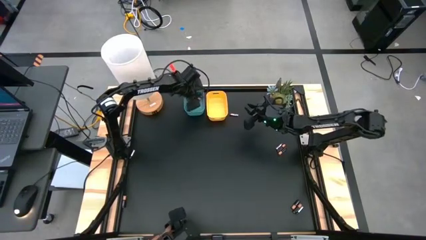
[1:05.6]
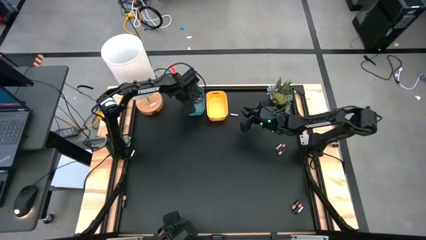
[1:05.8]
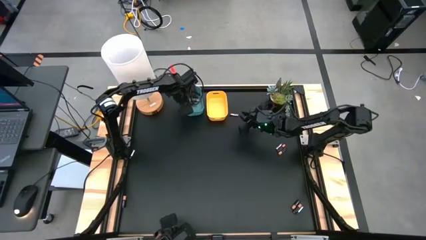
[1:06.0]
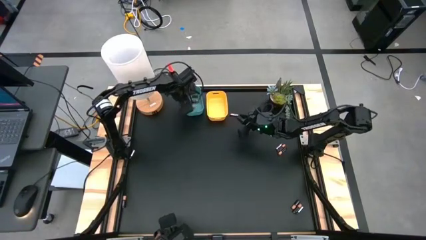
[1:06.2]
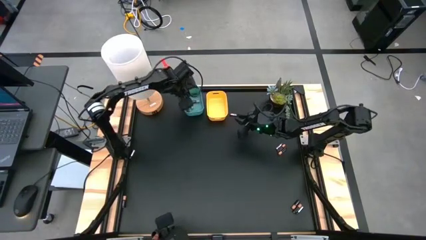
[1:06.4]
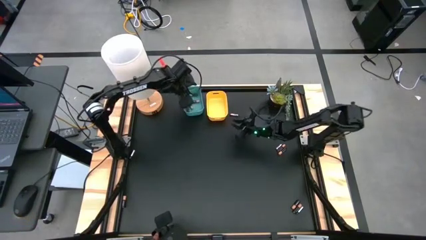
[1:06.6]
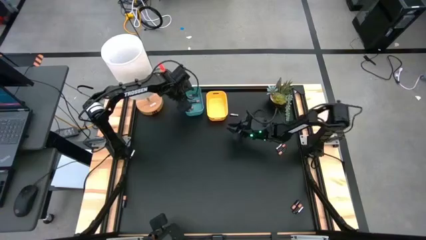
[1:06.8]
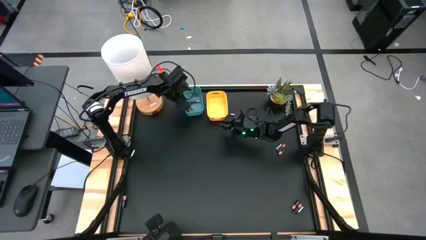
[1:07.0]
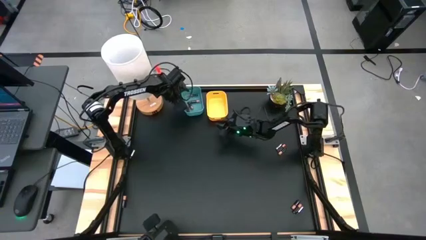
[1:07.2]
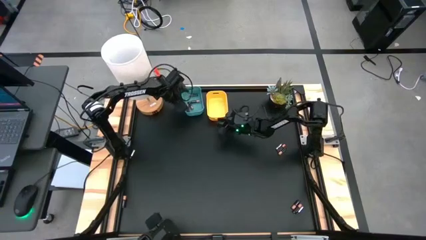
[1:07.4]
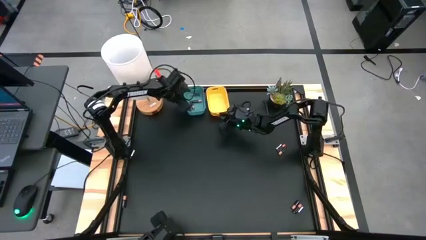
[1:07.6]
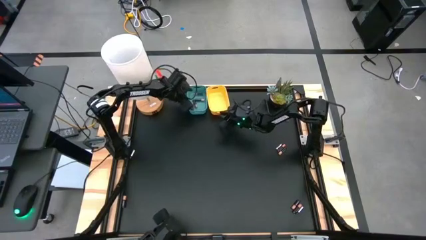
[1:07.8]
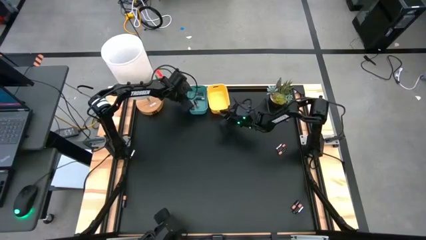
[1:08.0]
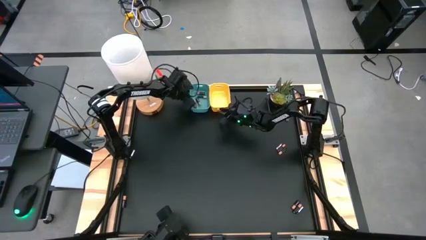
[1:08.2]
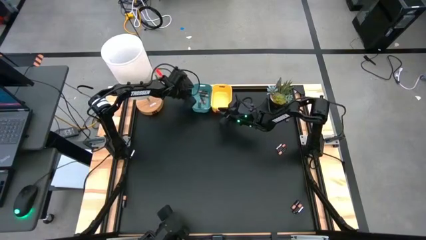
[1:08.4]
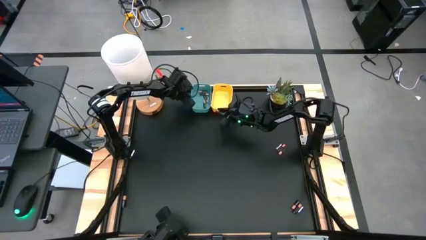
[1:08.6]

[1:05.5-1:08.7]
Task: Sort batteries
Adjust the bins

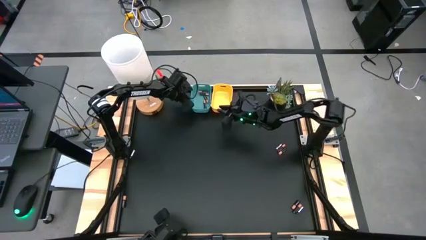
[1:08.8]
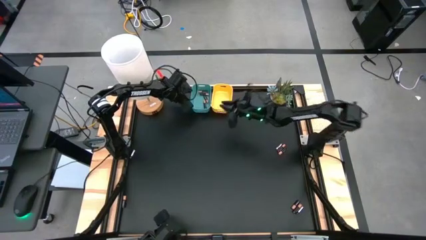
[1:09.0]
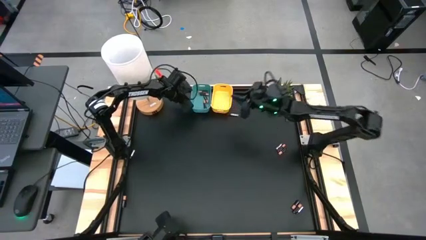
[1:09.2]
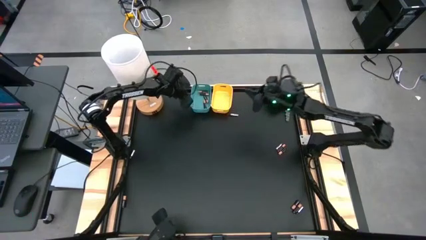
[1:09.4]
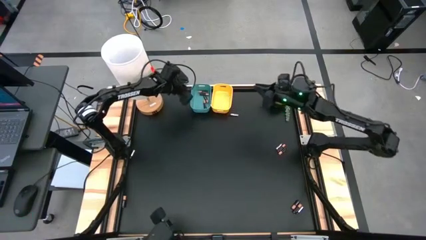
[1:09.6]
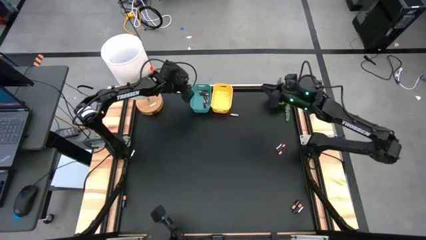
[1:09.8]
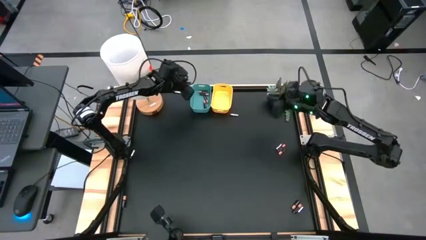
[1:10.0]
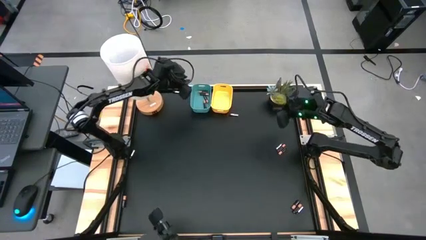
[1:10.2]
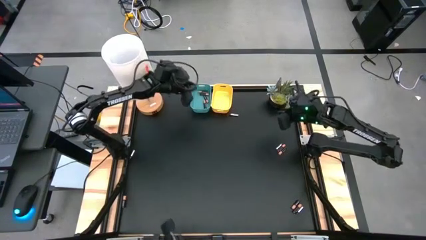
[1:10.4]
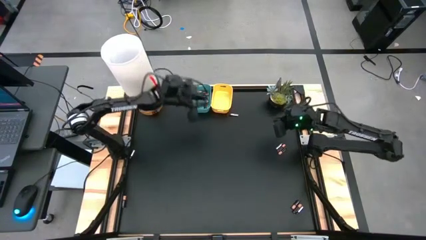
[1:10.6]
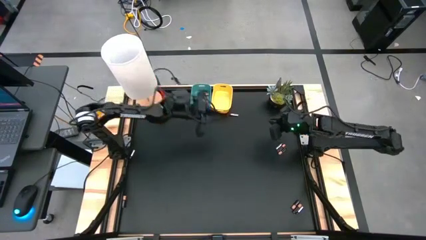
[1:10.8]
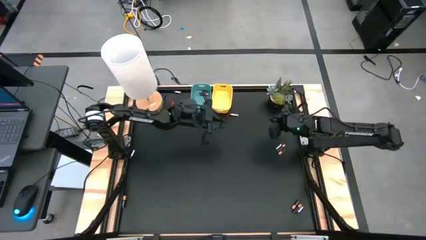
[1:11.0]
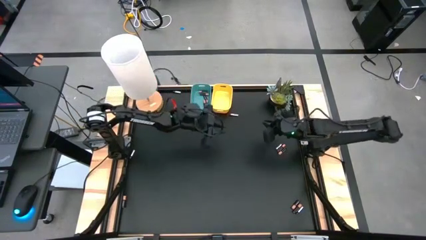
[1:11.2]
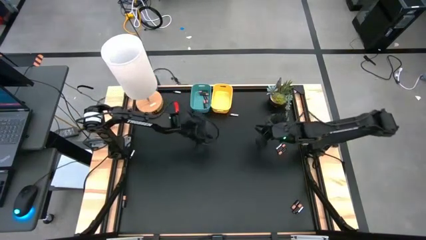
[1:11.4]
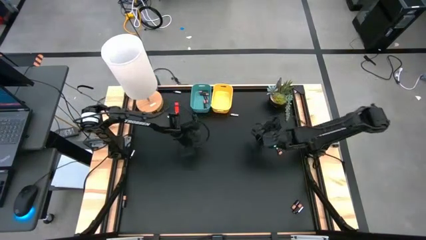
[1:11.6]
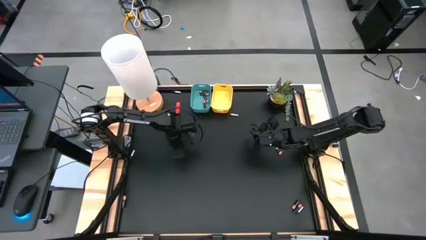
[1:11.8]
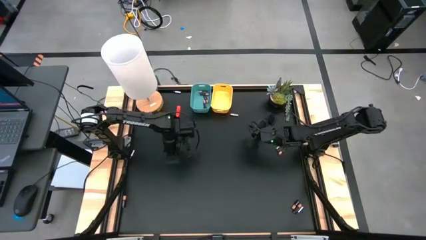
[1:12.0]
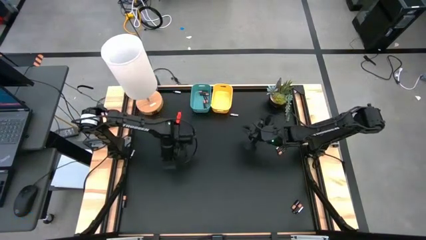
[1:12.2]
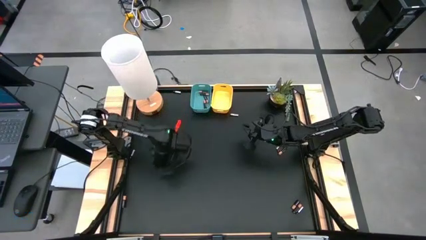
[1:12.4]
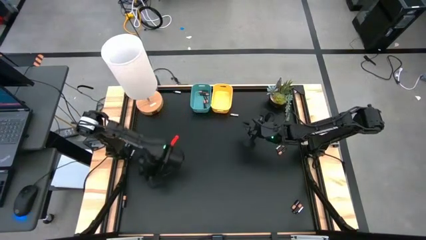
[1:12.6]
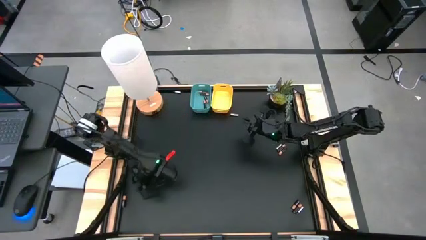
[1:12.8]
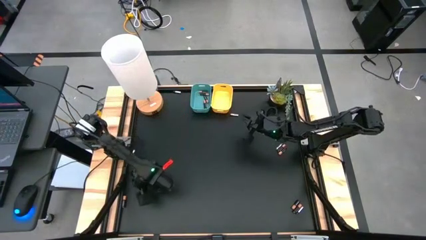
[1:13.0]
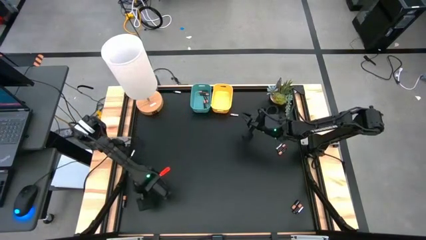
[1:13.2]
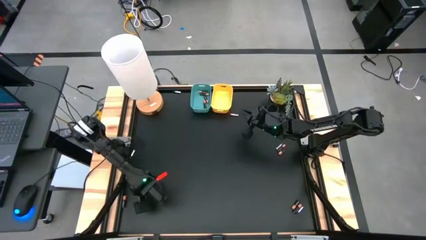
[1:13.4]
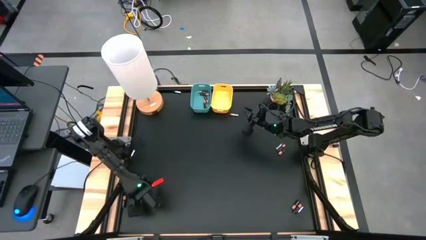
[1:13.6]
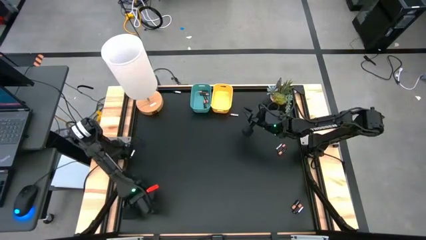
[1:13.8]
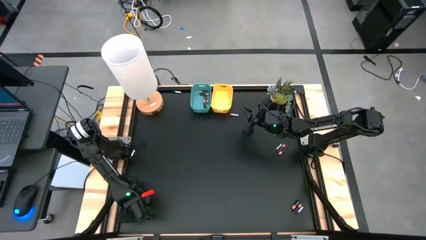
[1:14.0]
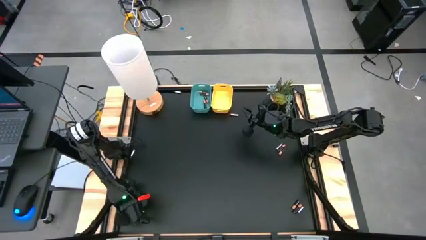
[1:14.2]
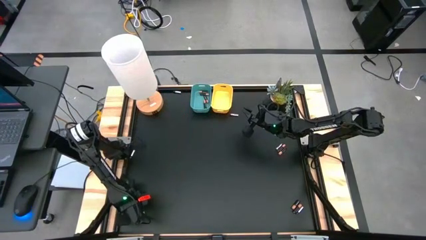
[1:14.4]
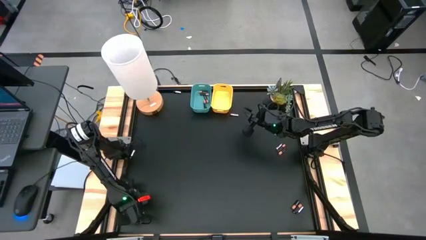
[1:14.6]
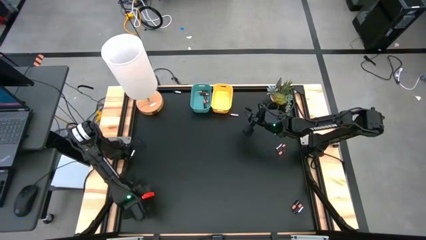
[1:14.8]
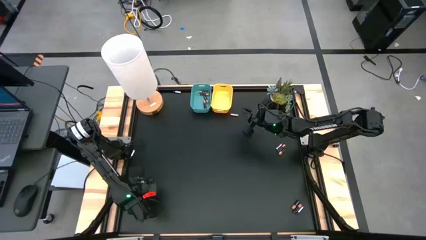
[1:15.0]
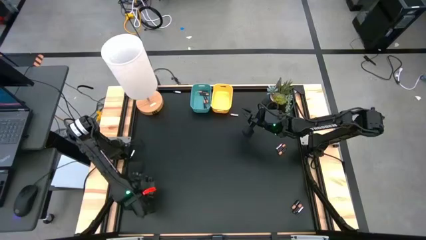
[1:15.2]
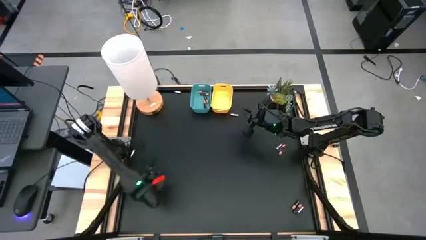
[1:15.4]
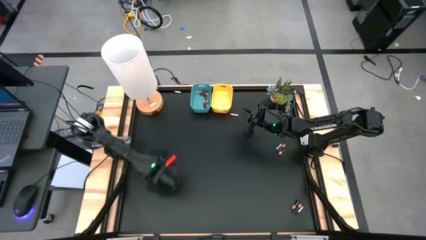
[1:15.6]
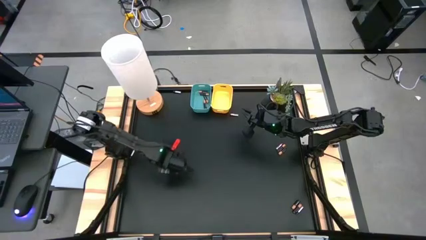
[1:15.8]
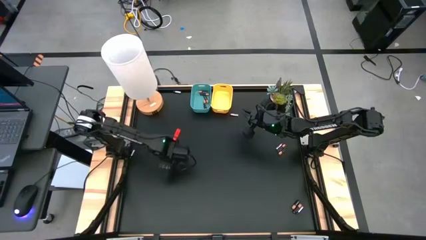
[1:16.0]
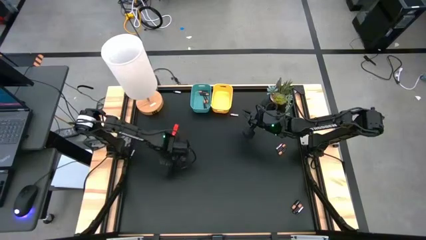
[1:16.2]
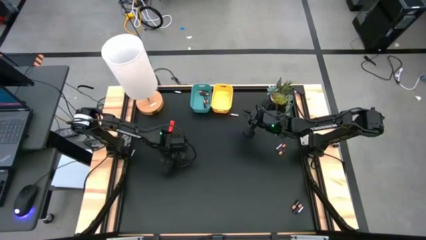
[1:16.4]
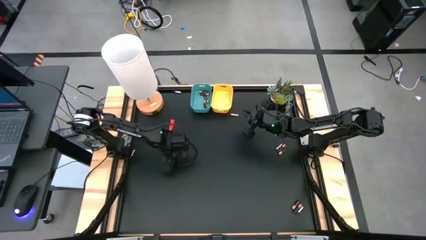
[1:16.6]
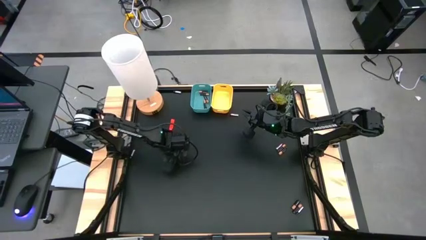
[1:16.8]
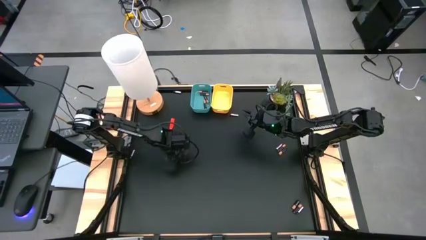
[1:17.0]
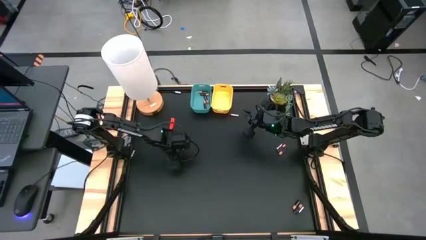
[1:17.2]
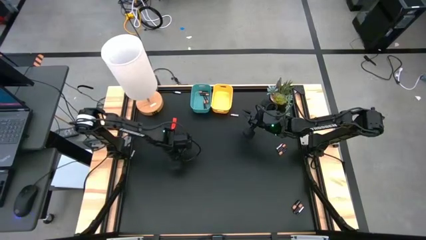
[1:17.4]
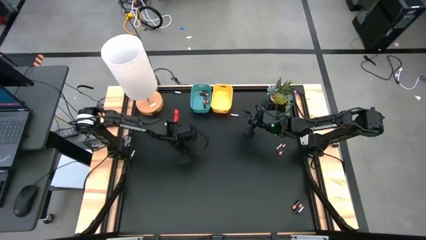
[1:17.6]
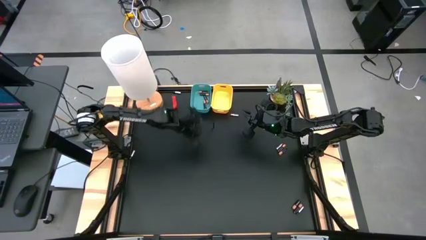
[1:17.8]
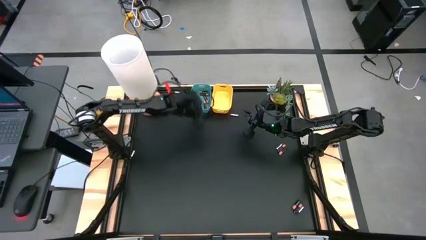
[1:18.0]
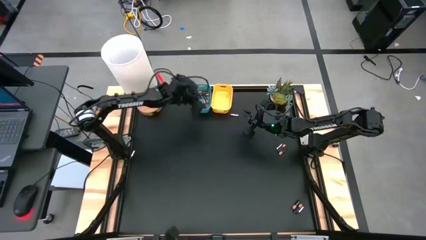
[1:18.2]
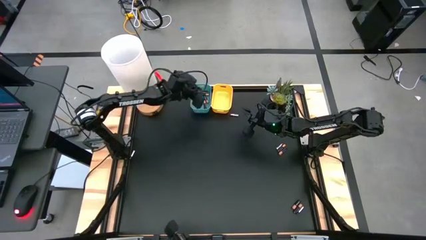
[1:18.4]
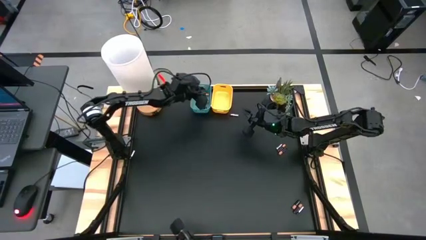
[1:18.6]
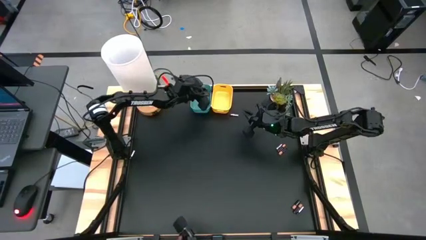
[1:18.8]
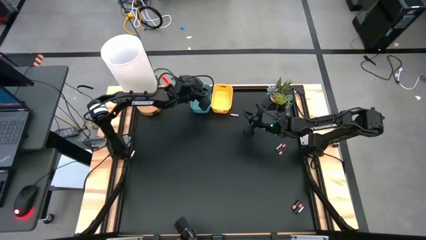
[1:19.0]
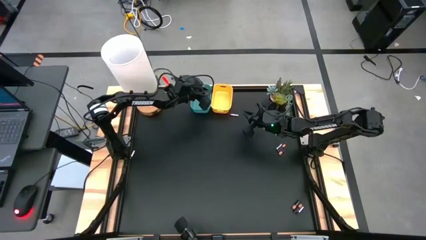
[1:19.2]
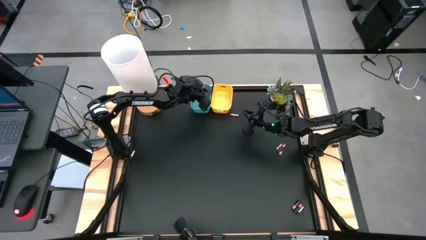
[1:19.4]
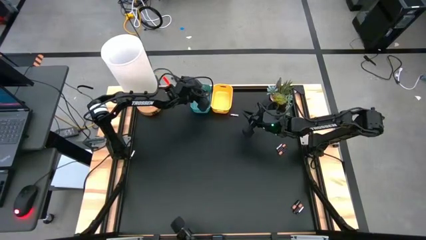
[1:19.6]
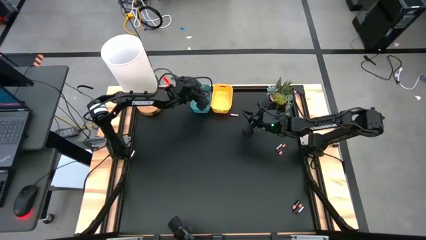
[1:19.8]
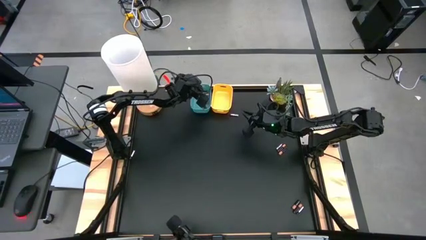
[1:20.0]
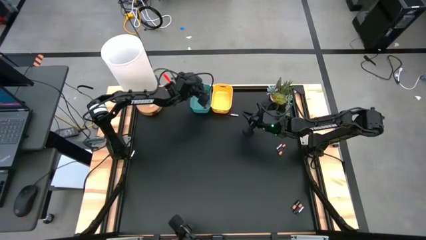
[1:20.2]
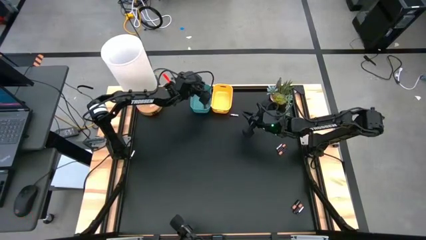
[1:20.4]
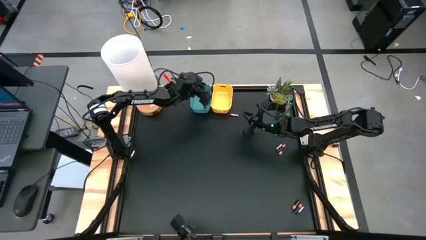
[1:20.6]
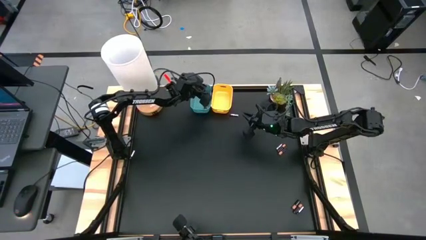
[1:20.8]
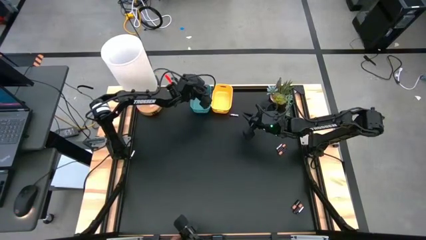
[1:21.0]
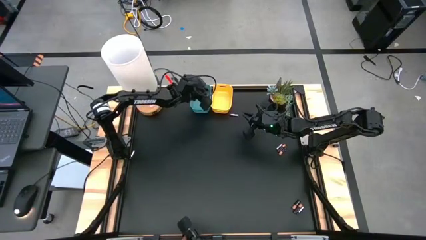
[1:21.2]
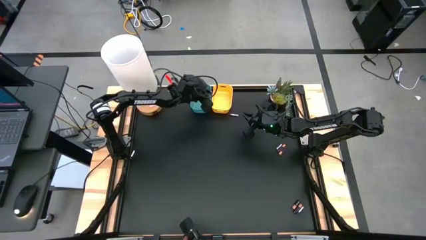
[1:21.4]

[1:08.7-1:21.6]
Put the gold black battery into the blue bin
